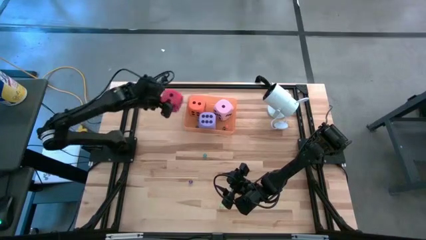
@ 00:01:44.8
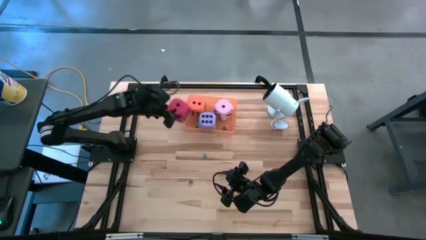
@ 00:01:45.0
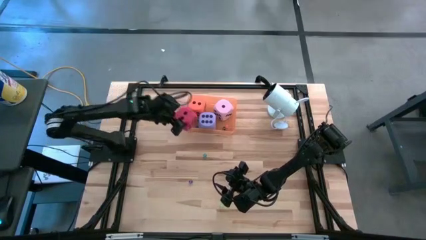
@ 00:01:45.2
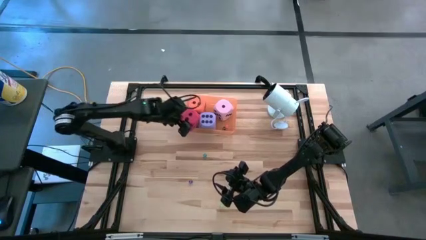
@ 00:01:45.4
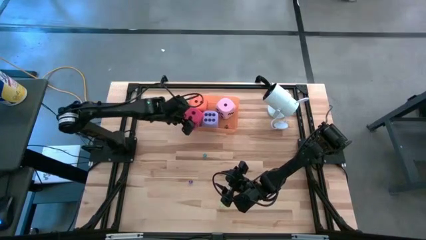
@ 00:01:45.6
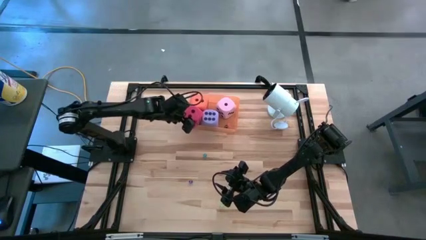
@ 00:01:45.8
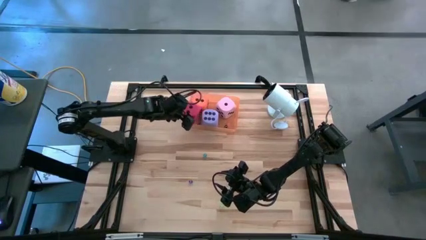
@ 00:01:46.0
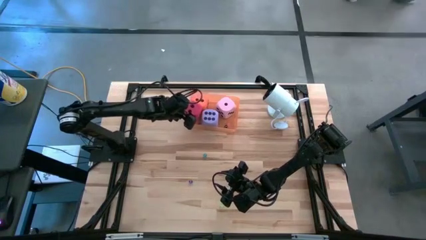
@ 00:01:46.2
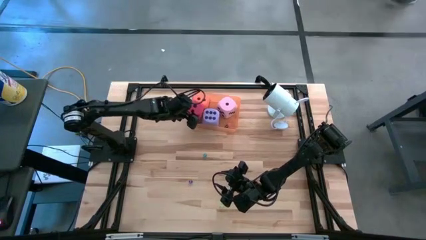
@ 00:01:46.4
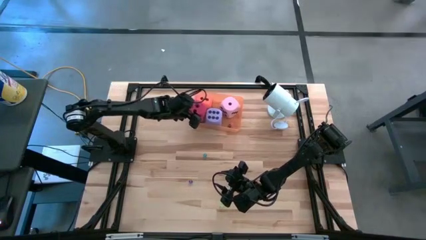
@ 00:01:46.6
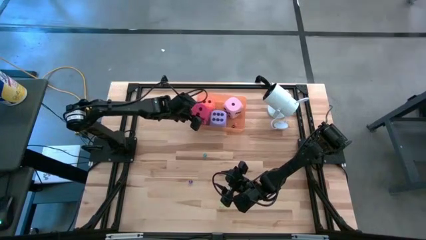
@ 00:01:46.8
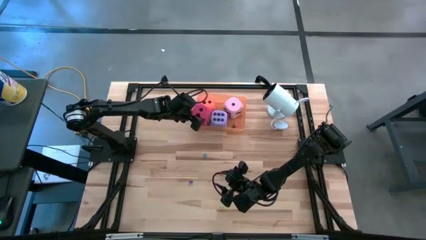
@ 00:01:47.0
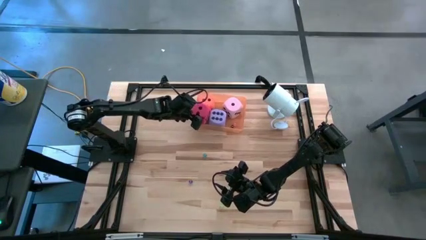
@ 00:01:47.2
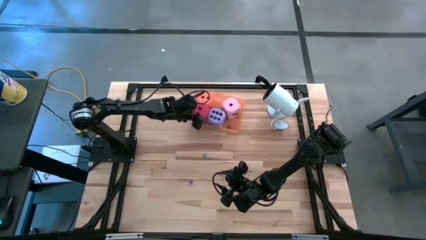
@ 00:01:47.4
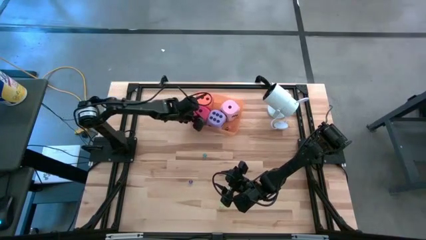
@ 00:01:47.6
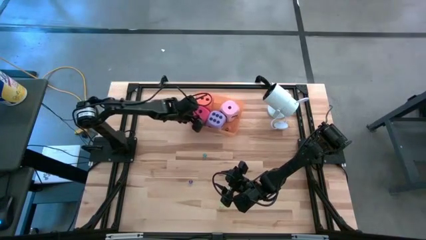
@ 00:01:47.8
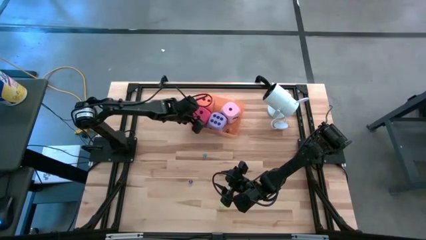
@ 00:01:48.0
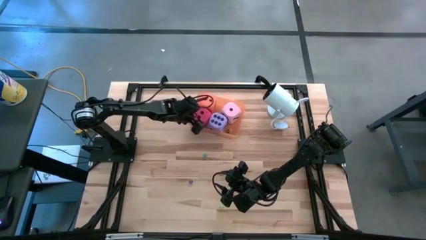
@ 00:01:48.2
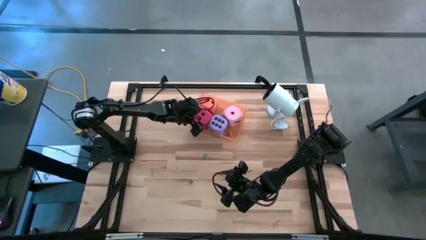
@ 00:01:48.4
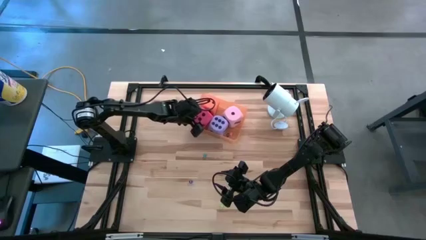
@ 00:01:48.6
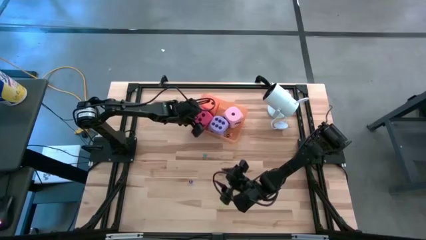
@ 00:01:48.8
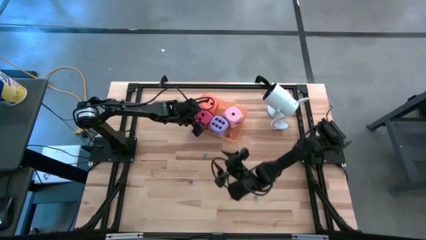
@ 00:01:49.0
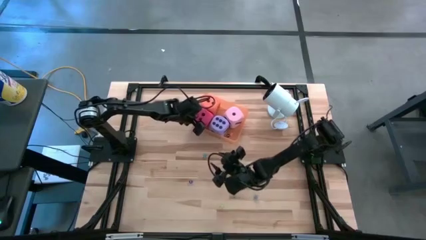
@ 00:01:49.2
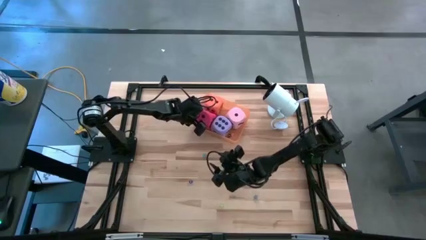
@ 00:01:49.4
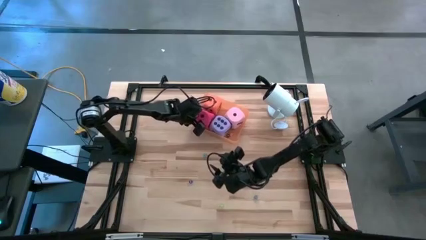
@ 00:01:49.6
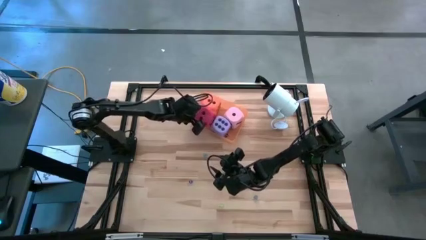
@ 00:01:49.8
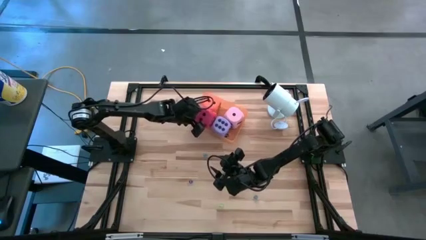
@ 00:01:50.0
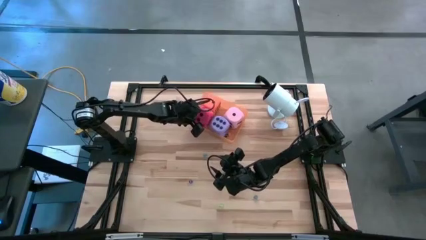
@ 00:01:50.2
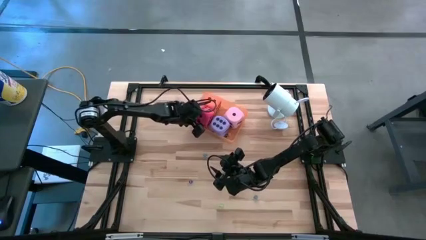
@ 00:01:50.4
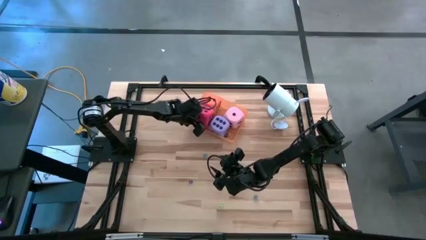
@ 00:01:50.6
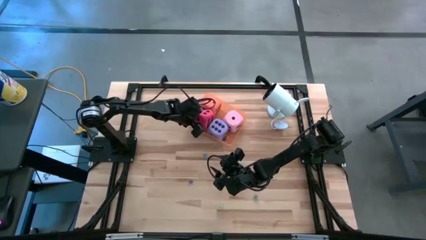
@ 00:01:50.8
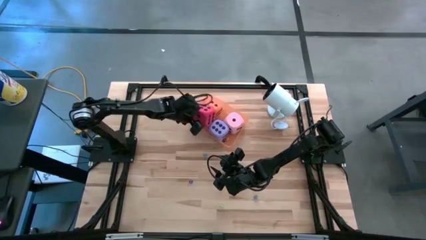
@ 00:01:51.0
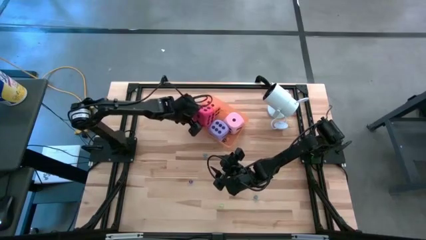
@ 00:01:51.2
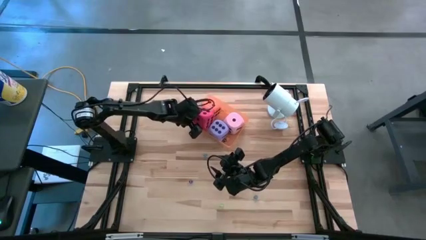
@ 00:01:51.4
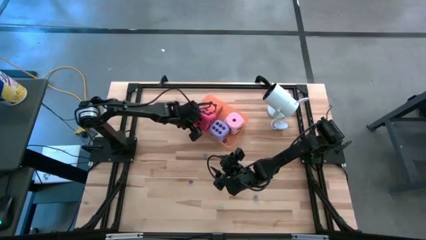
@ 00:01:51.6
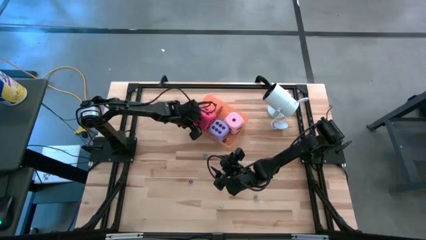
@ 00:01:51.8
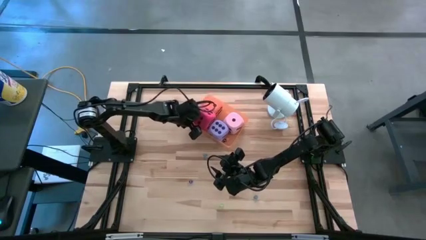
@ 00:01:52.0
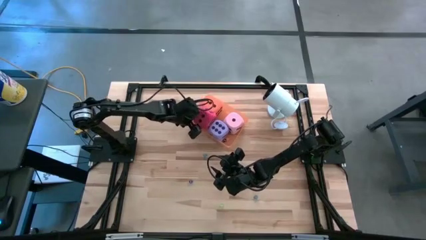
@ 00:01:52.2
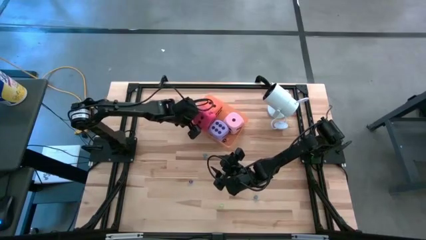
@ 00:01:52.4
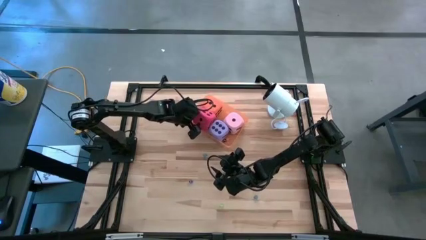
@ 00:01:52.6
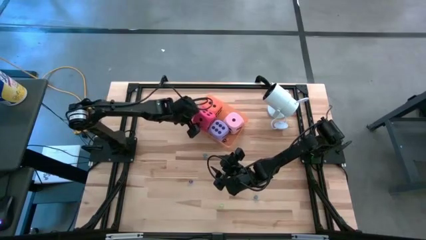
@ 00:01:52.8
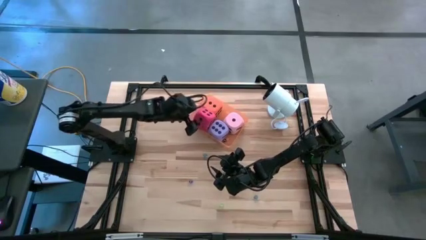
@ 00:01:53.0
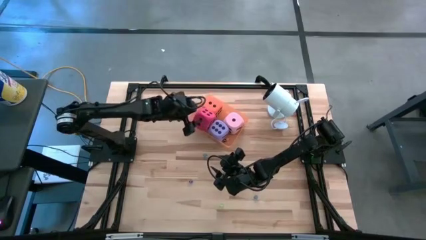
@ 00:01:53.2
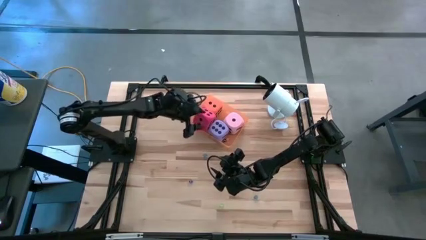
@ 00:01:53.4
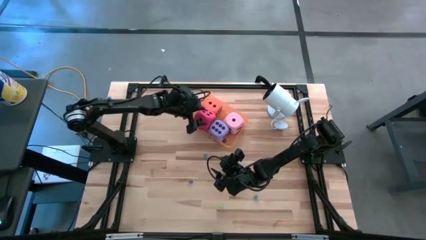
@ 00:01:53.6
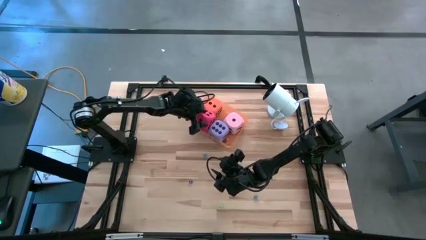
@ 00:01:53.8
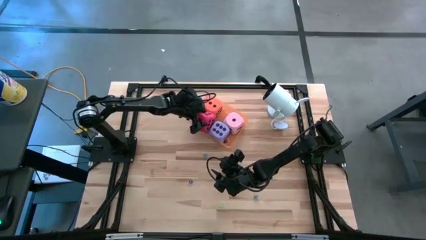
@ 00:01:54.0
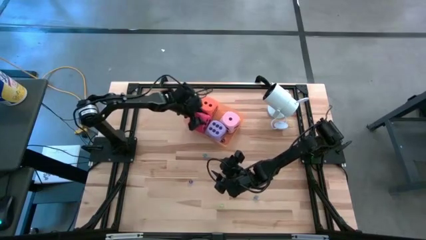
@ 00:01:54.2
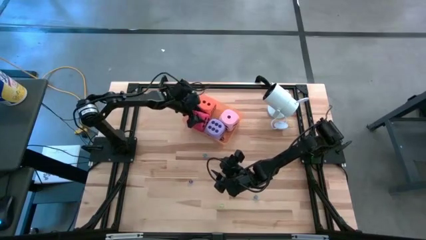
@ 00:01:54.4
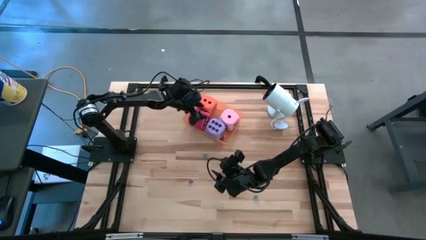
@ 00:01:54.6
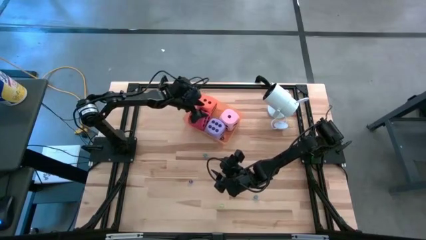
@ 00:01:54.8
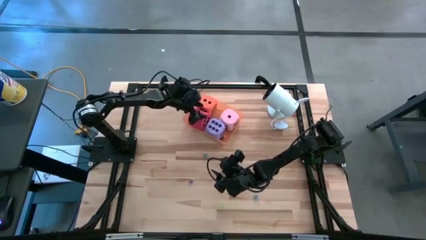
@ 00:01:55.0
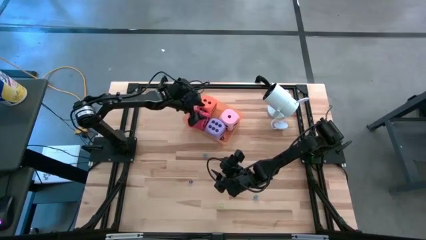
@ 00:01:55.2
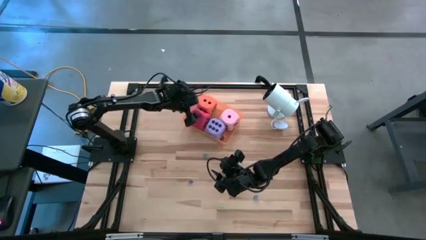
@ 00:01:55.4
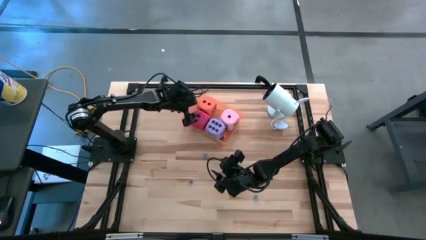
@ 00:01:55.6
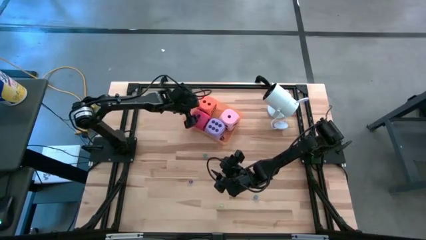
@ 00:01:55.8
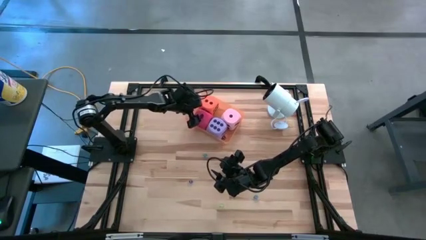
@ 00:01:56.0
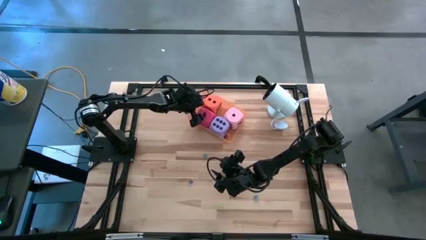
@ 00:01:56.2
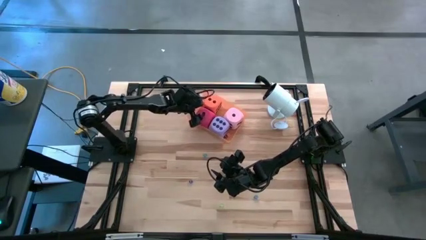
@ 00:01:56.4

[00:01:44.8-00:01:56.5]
Task: Pick & Place Dice
Put the large red die into the orange bin

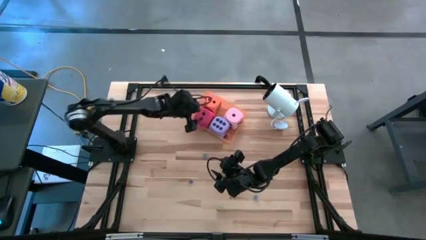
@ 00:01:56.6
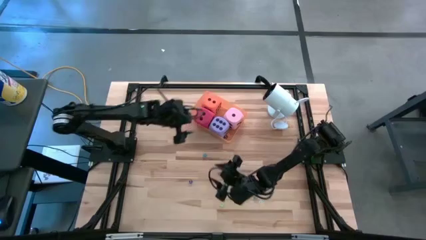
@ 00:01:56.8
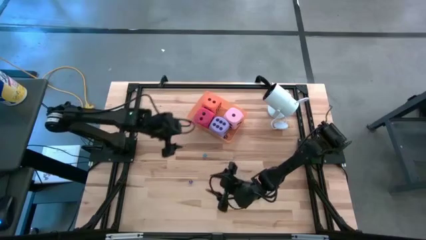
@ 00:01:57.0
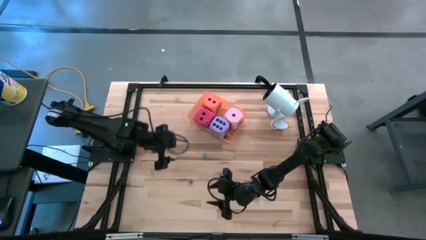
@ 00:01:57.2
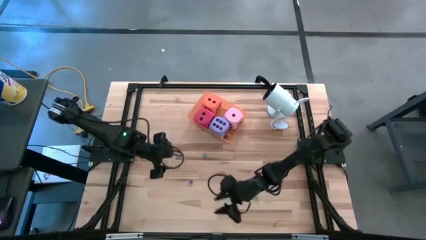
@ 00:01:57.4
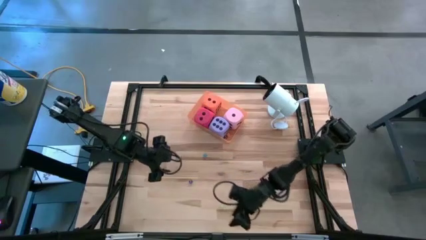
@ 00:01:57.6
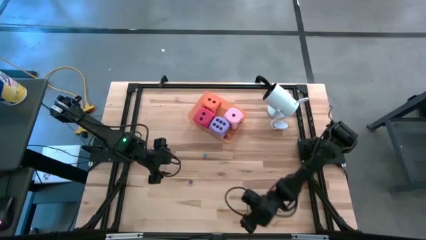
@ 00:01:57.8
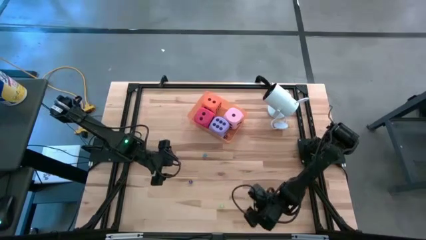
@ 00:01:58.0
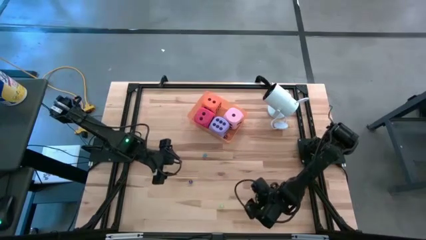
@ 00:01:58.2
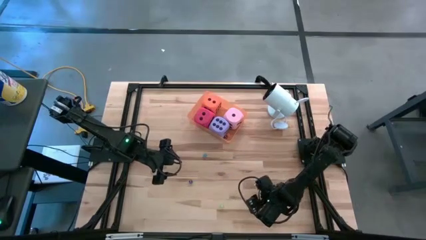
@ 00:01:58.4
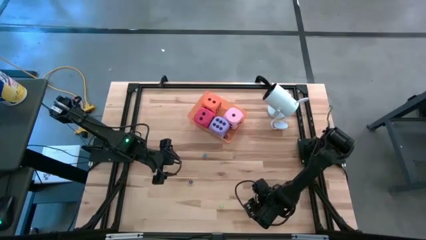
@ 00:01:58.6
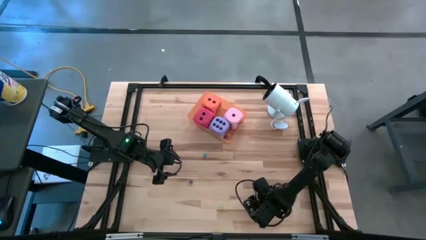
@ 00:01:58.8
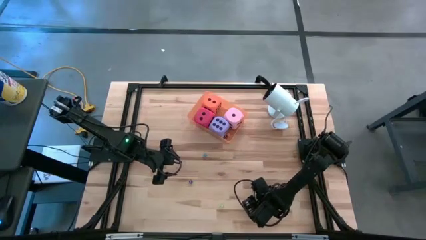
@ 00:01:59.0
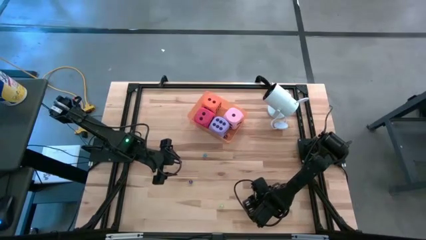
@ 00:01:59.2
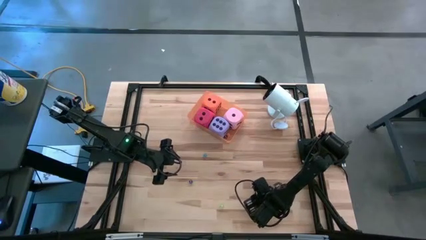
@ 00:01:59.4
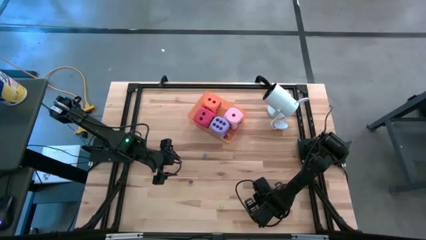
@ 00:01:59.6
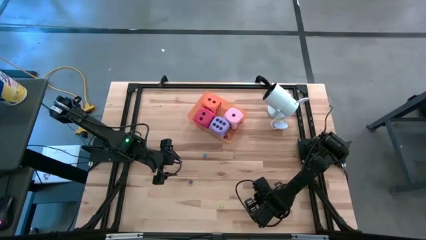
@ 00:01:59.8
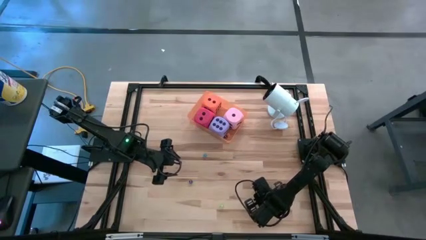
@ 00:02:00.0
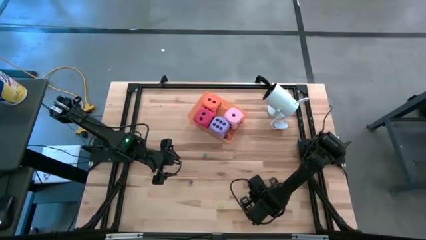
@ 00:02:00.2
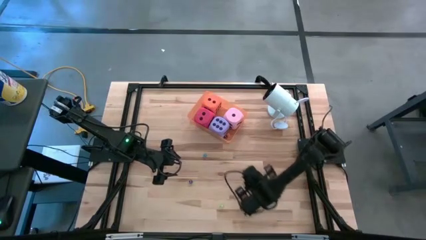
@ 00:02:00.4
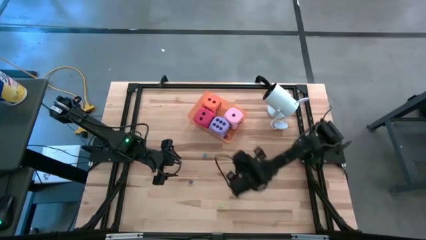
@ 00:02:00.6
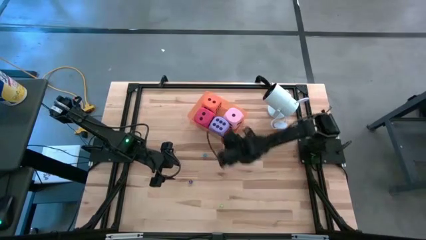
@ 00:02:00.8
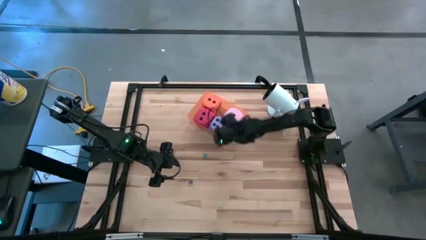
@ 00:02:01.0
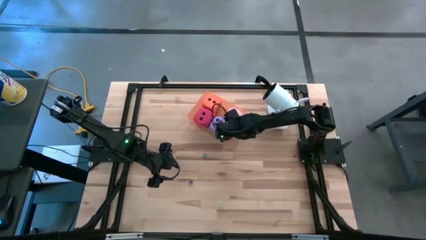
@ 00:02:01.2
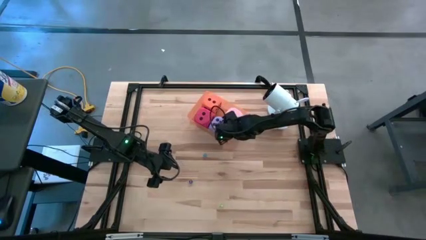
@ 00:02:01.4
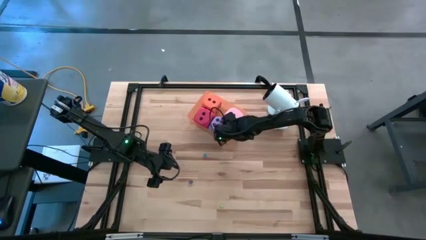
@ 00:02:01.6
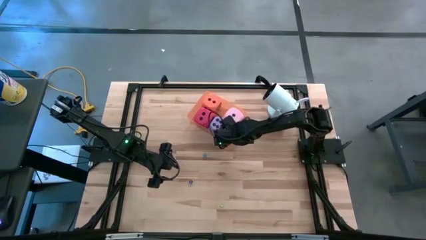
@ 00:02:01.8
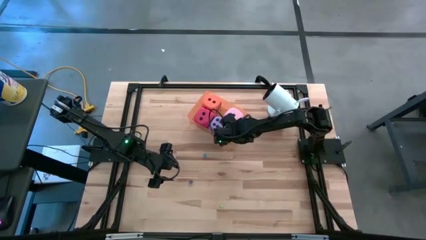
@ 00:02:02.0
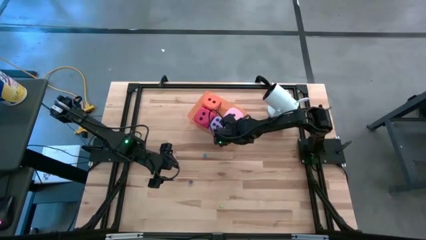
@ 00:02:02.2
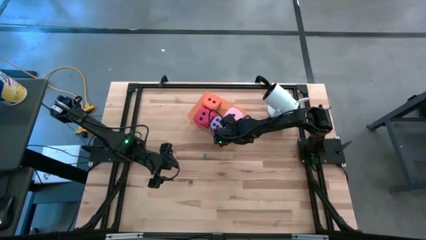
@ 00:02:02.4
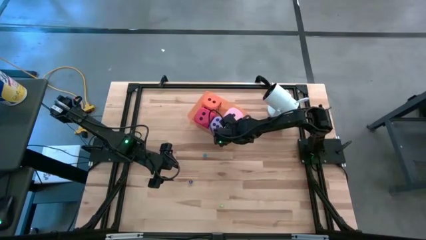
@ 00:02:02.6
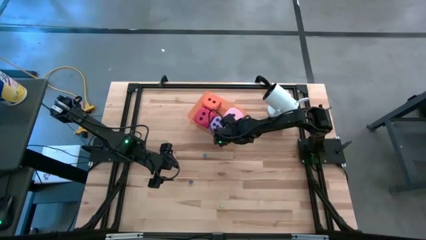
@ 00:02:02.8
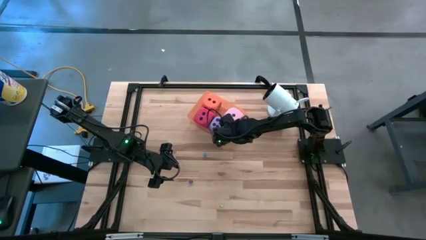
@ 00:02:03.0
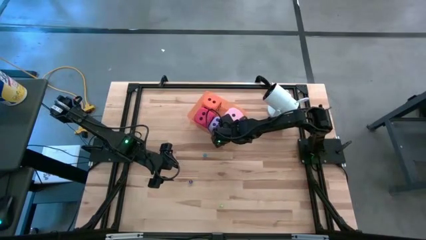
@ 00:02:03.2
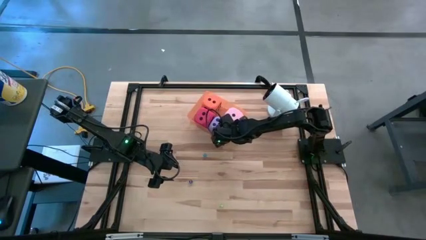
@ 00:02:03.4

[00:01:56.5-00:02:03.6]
Put the small blue die into the orange bin
